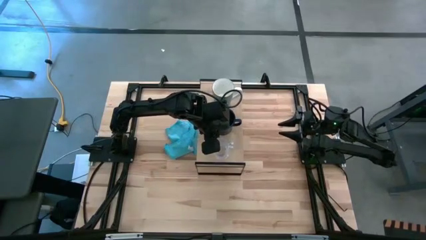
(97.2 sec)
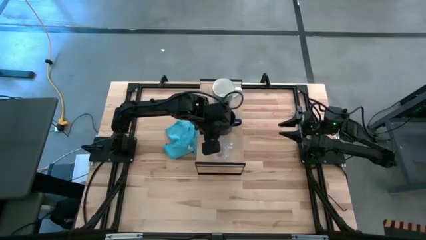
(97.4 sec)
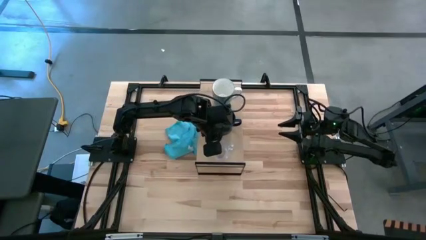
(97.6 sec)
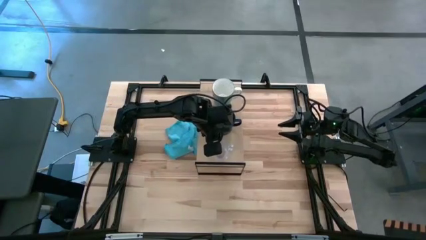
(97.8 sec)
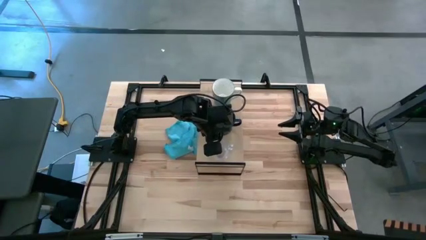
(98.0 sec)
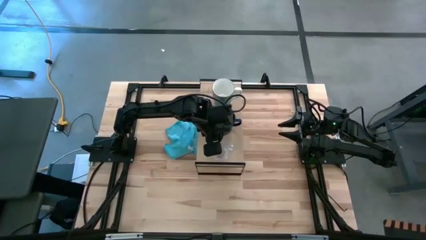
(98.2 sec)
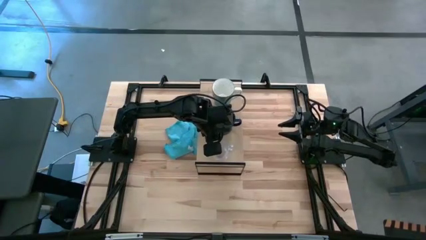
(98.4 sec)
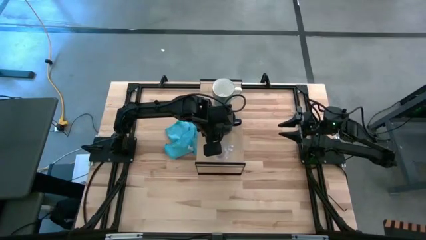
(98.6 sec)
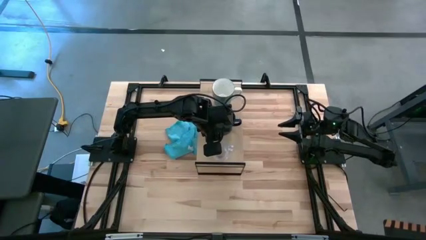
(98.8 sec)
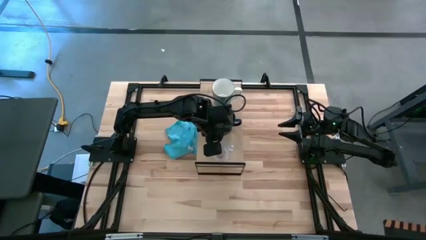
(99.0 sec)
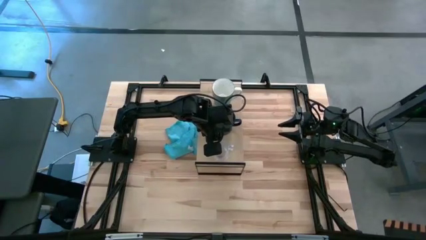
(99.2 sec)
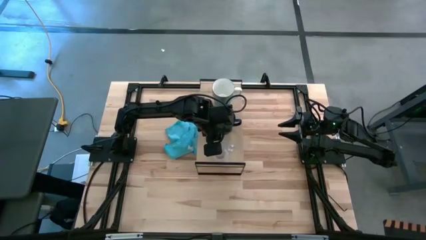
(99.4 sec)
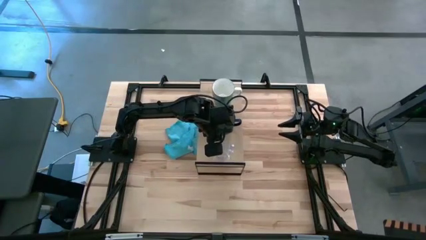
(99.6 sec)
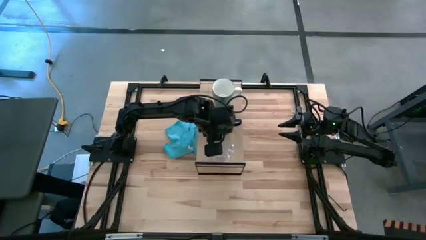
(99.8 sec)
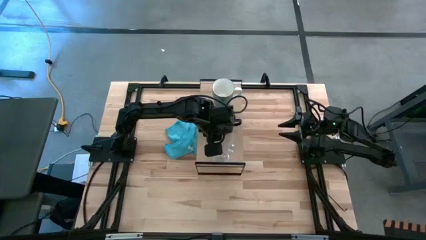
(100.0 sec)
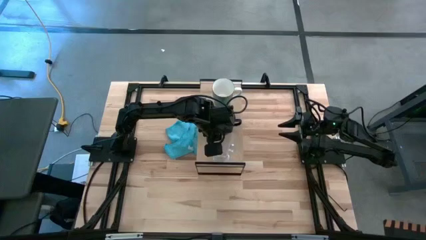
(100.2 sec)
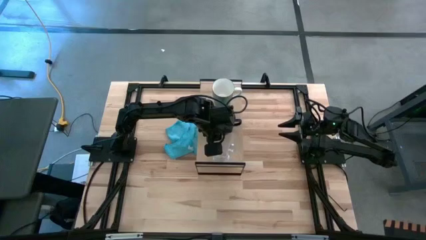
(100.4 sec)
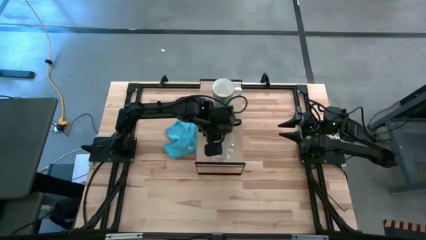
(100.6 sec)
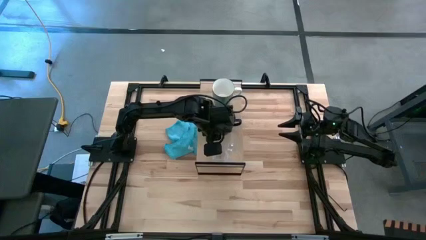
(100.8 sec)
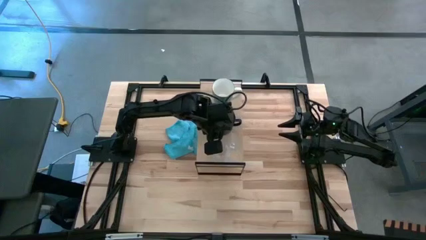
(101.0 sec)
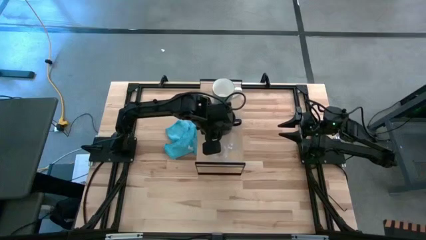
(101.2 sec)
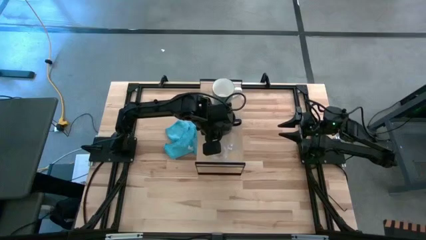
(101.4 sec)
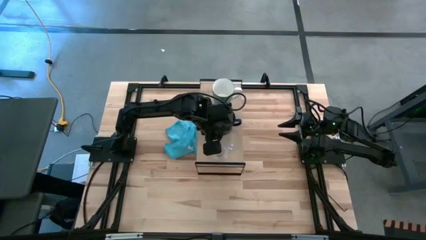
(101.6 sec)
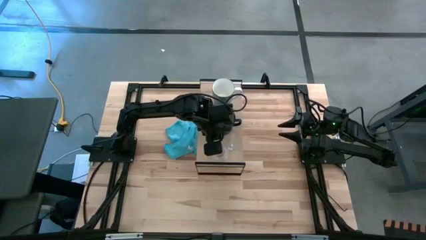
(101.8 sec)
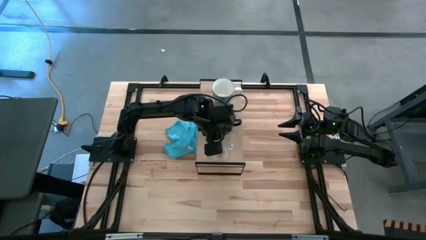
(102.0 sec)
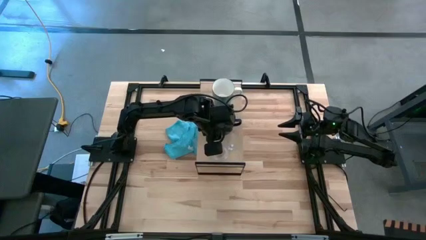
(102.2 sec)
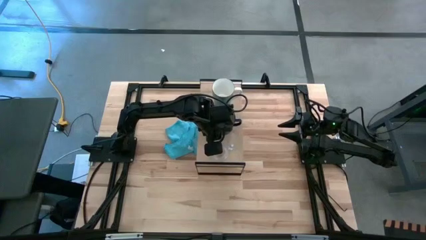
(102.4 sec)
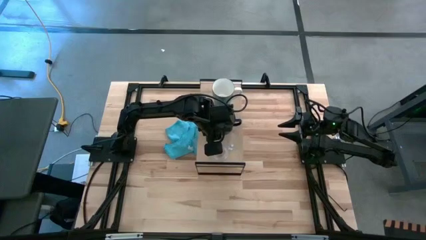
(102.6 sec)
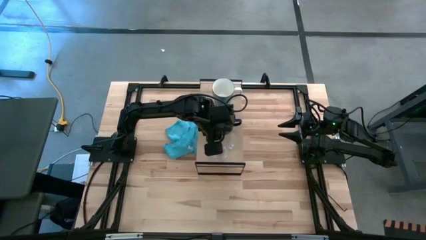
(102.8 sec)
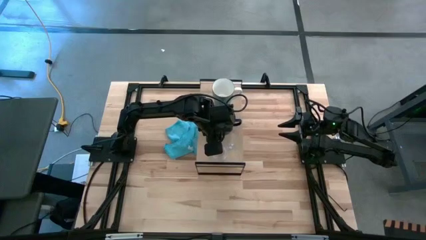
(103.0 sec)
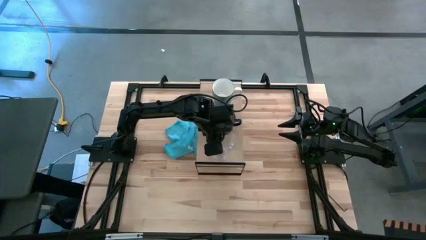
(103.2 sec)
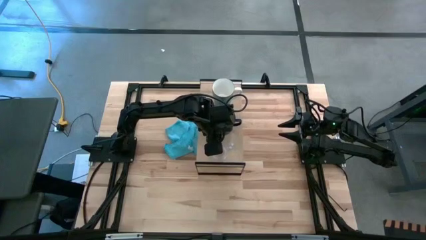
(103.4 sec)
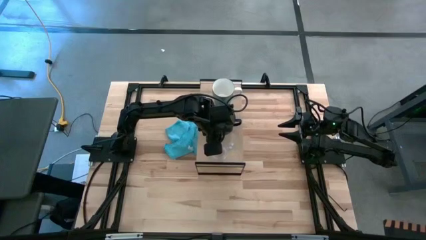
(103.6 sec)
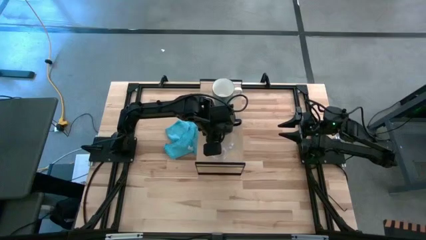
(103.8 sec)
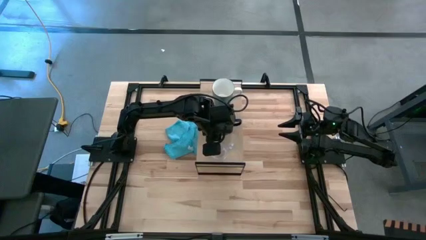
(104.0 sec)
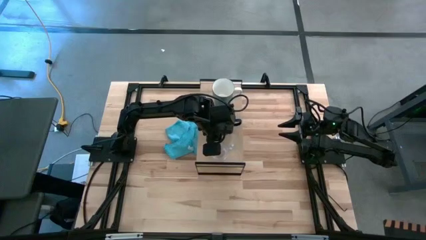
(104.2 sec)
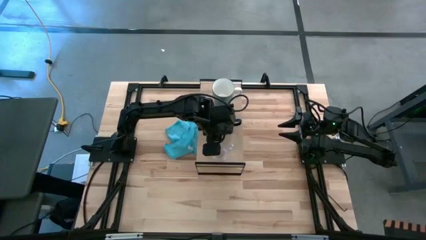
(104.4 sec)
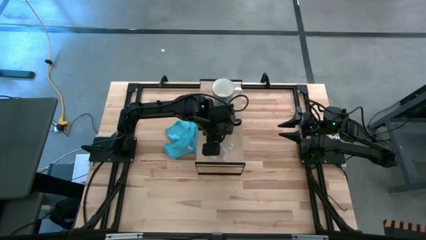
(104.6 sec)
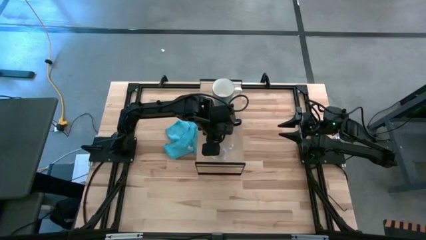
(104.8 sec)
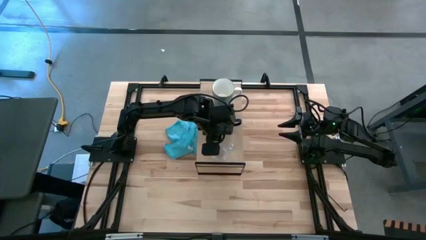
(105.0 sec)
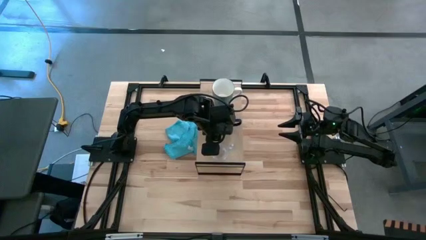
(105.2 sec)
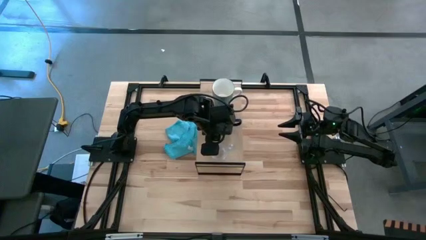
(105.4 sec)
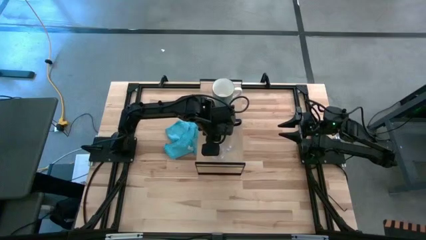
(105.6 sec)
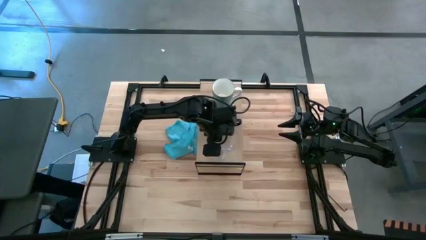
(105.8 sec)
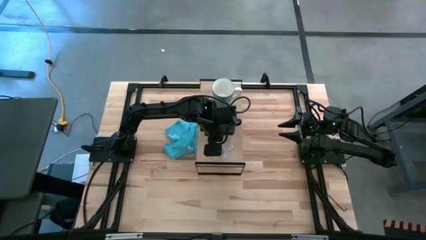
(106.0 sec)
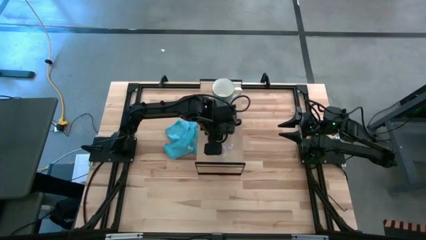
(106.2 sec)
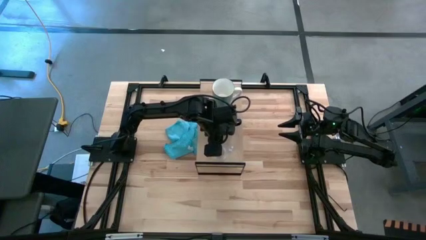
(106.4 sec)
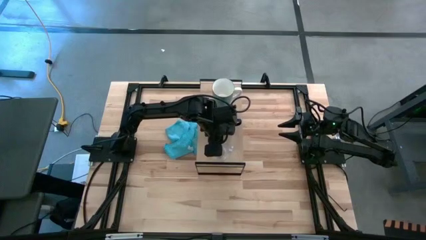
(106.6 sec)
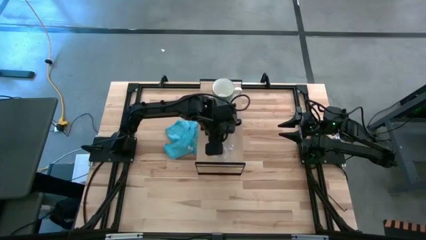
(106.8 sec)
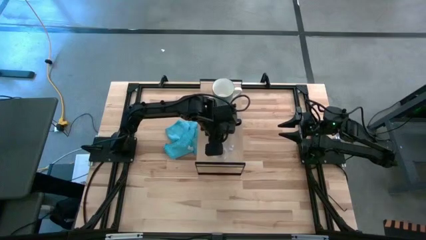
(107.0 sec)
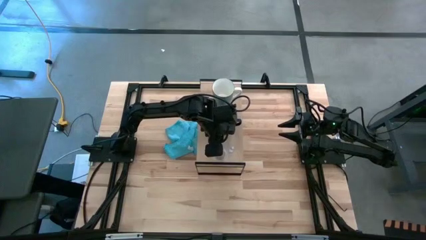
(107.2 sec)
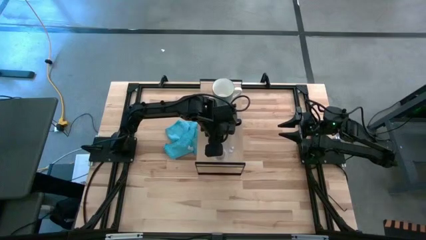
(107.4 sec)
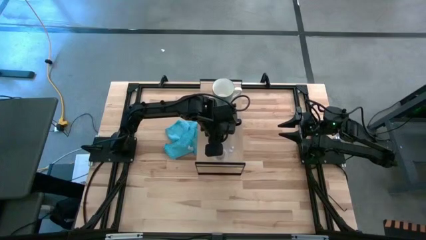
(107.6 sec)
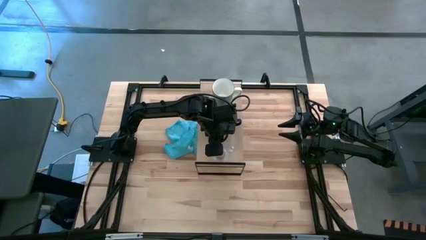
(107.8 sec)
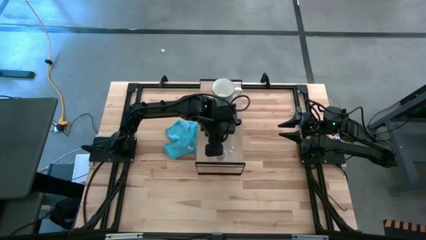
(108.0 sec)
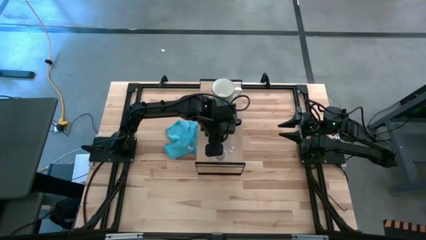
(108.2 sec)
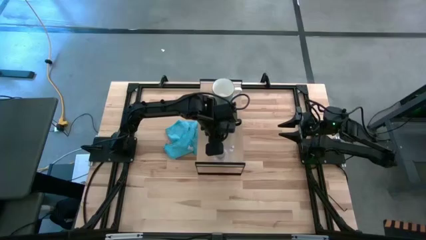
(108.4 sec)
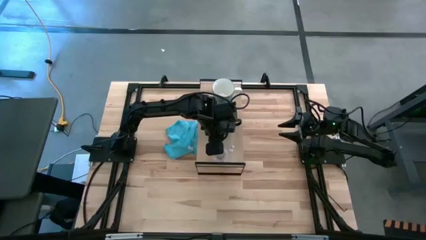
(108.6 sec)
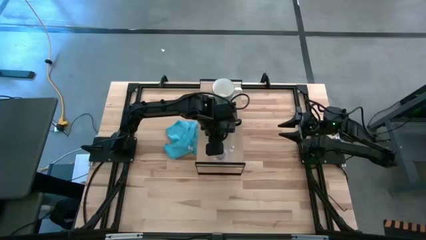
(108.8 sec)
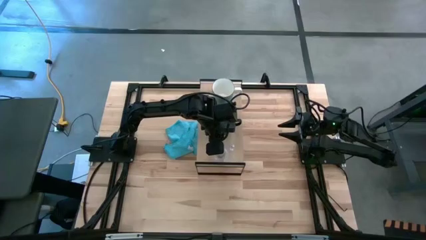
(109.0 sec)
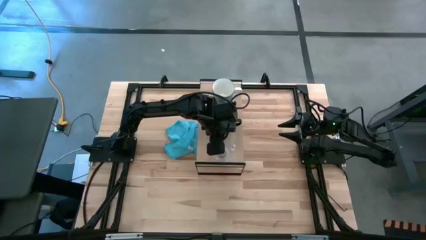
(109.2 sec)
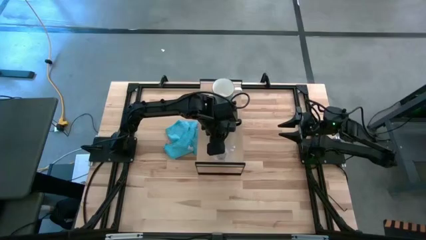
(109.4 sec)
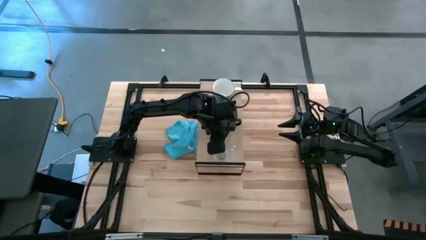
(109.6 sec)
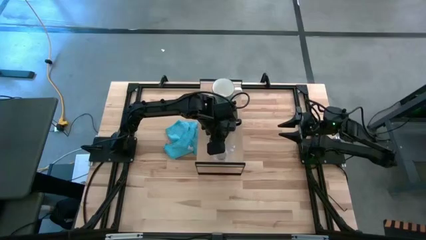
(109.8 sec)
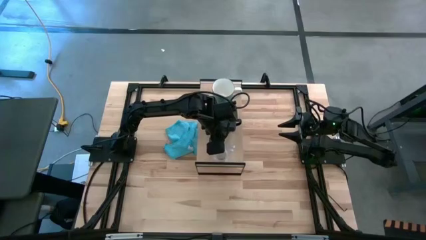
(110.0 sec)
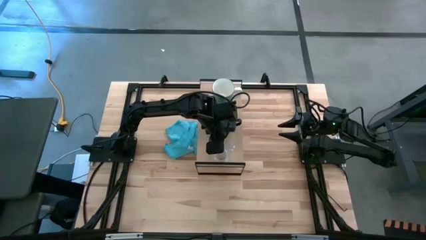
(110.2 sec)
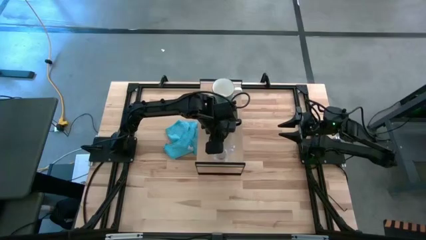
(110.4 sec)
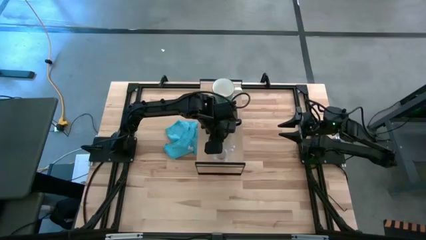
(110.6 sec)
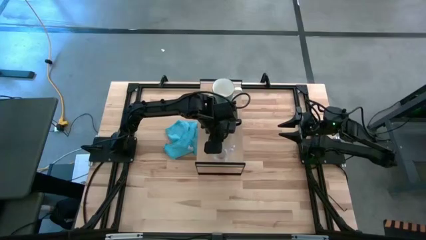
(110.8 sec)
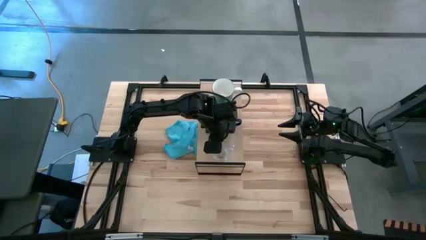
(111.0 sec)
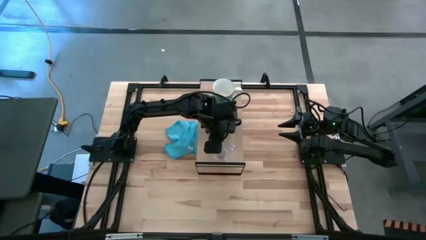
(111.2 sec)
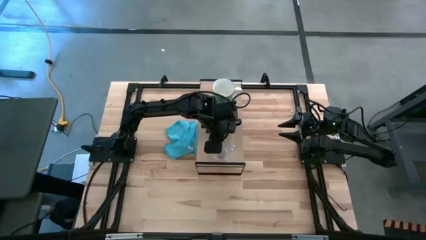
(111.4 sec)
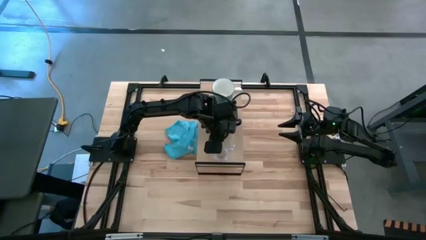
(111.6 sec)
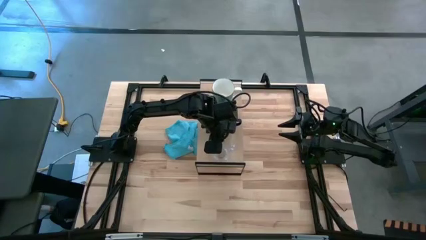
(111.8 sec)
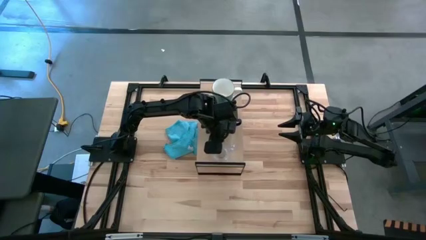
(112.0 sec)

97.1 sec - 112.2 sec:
Task: Stack small to large cups/mugs on shelf
Put the transparent mug on the shelf
